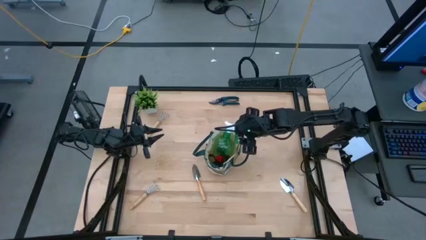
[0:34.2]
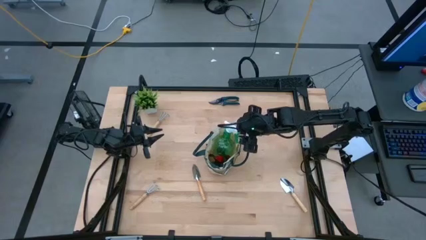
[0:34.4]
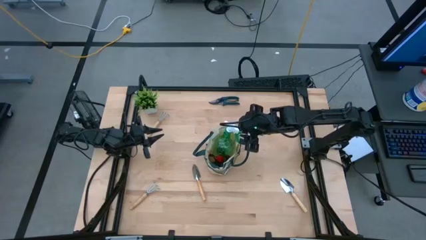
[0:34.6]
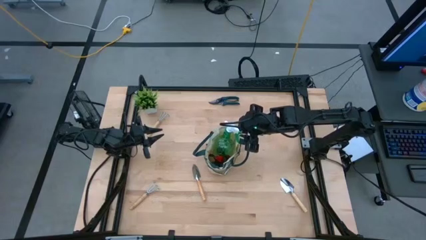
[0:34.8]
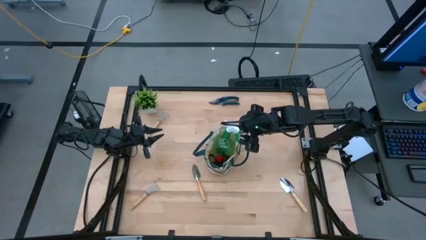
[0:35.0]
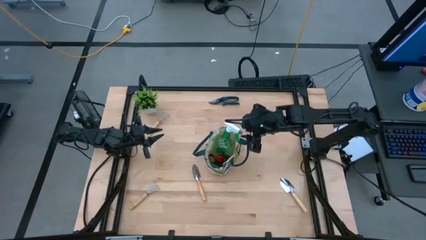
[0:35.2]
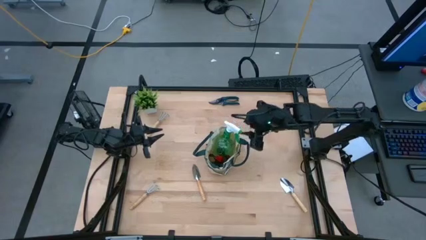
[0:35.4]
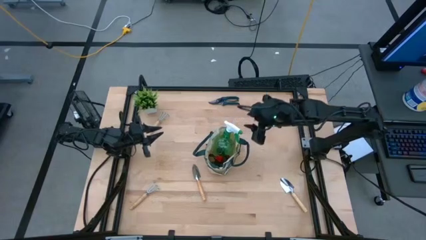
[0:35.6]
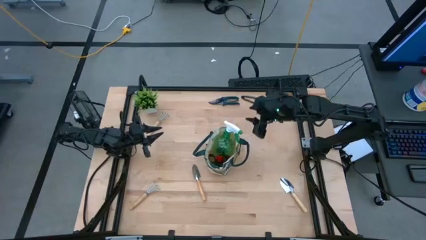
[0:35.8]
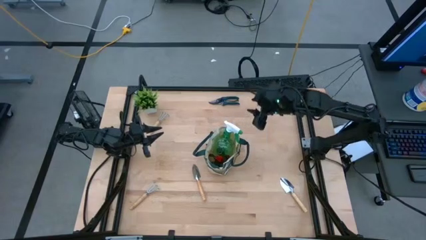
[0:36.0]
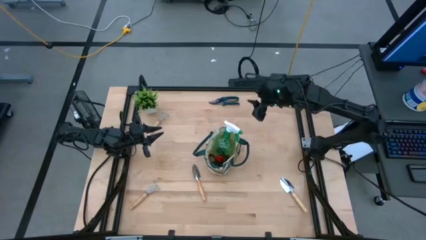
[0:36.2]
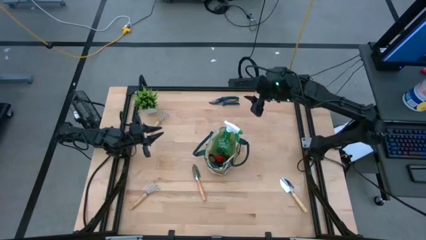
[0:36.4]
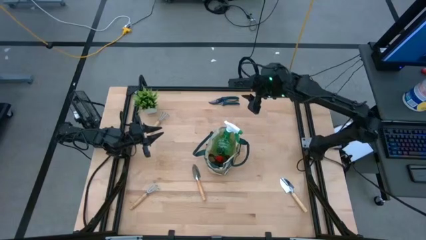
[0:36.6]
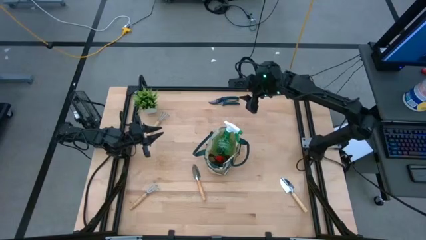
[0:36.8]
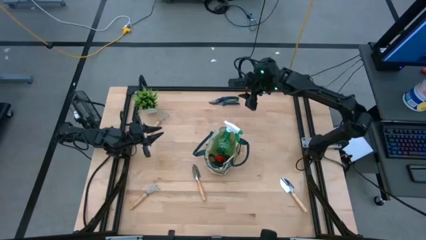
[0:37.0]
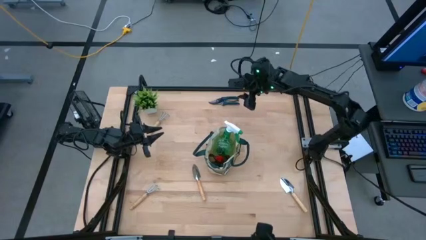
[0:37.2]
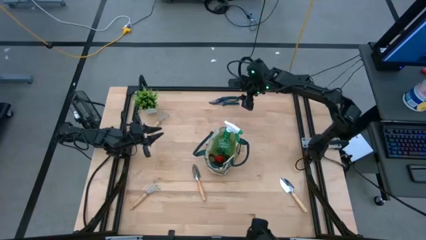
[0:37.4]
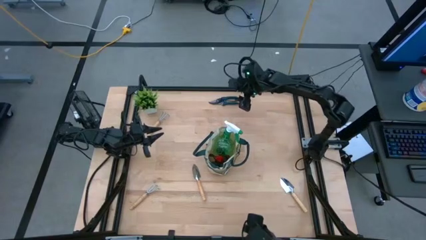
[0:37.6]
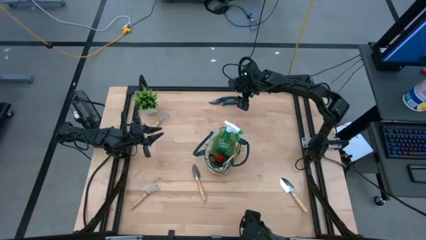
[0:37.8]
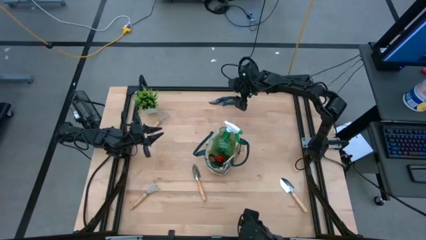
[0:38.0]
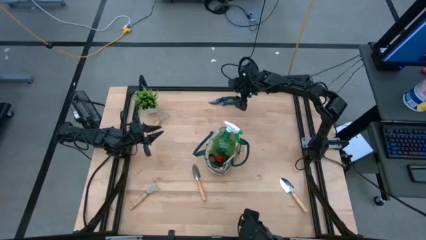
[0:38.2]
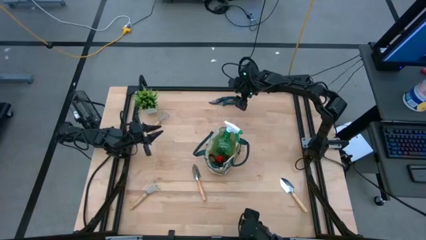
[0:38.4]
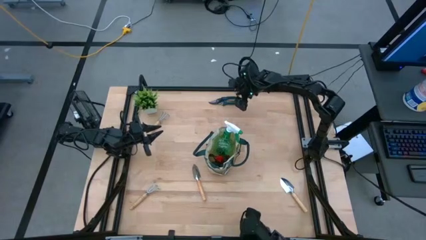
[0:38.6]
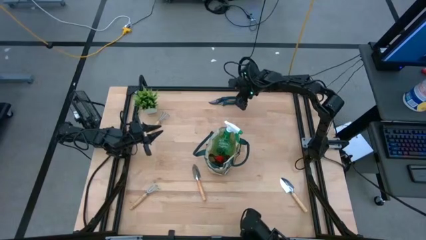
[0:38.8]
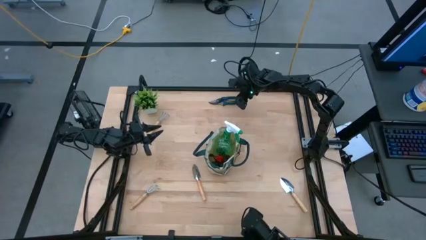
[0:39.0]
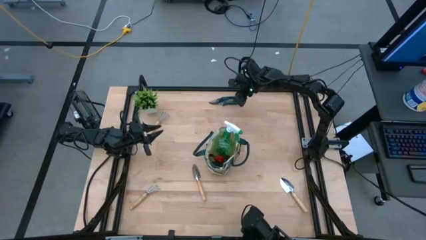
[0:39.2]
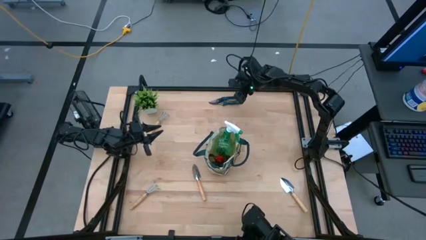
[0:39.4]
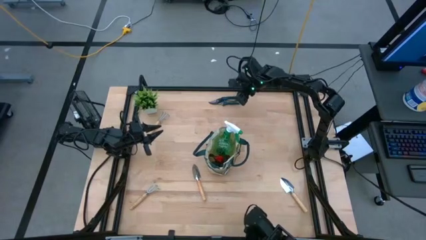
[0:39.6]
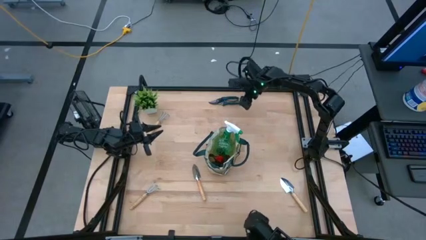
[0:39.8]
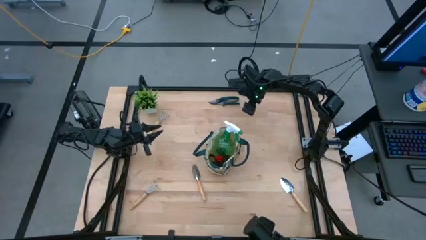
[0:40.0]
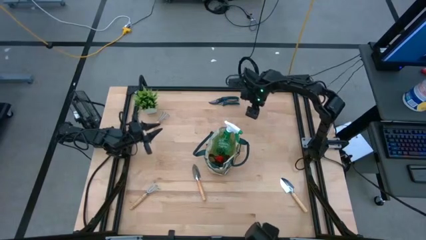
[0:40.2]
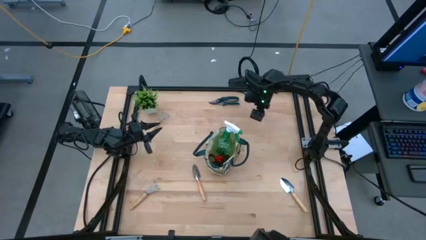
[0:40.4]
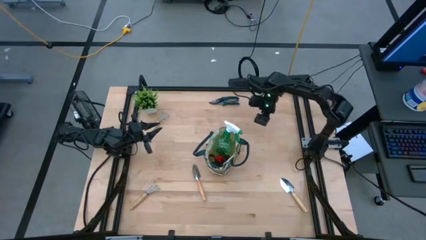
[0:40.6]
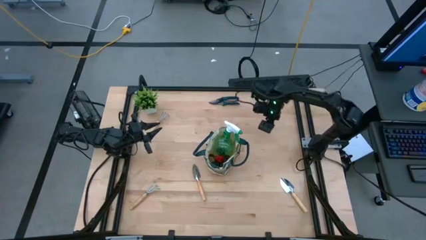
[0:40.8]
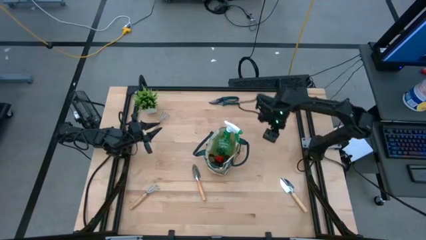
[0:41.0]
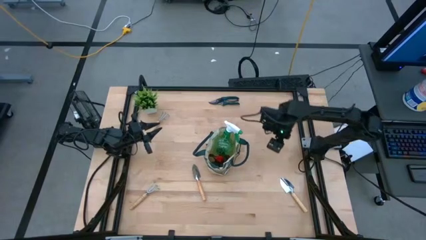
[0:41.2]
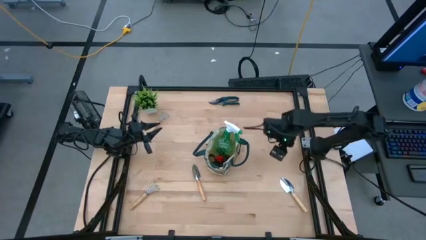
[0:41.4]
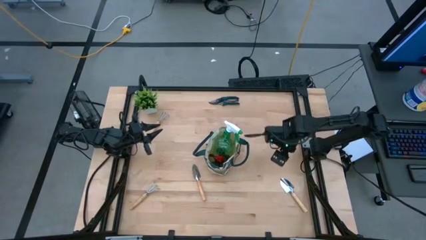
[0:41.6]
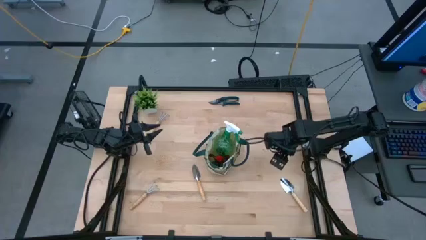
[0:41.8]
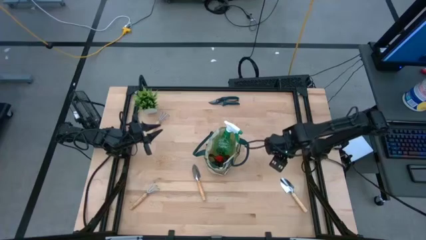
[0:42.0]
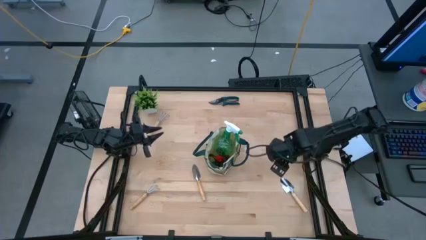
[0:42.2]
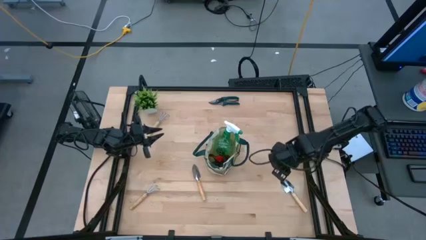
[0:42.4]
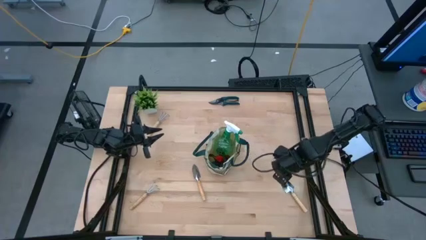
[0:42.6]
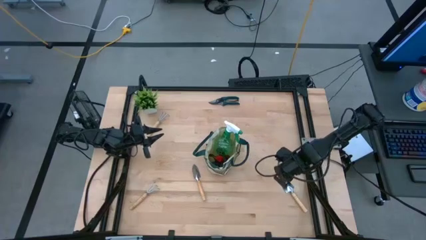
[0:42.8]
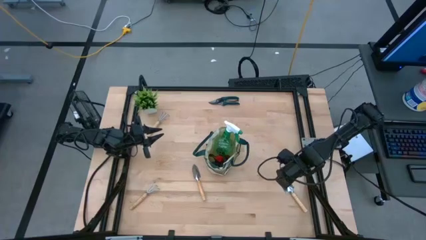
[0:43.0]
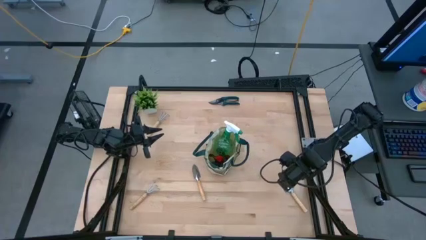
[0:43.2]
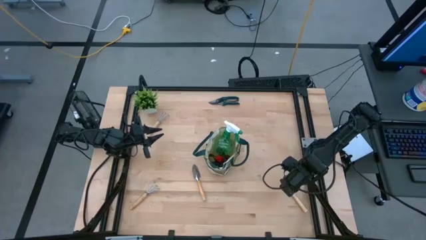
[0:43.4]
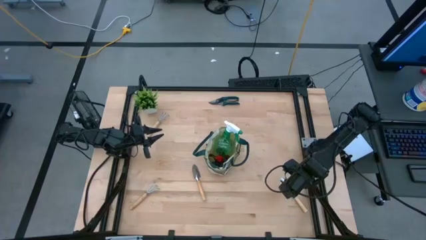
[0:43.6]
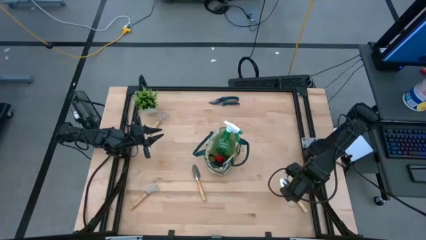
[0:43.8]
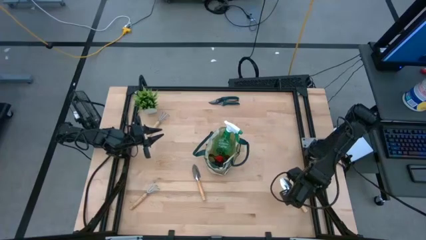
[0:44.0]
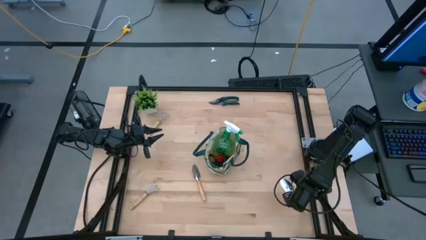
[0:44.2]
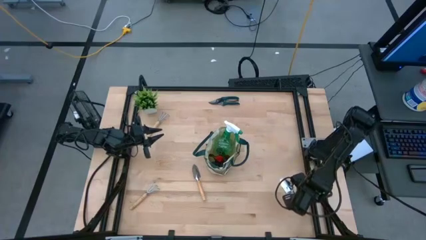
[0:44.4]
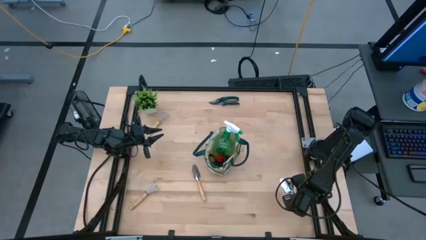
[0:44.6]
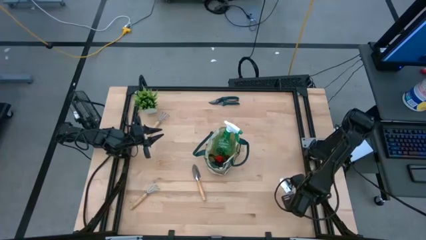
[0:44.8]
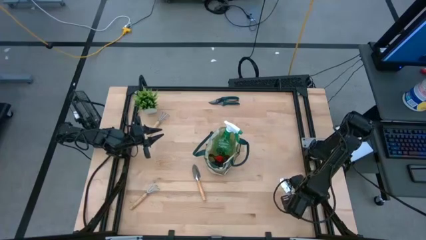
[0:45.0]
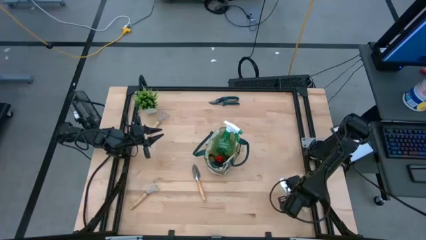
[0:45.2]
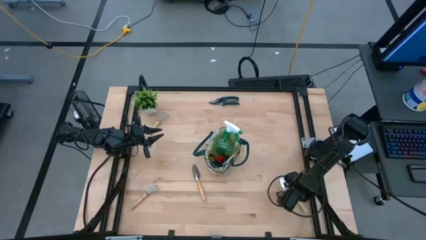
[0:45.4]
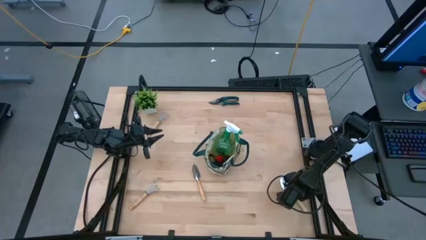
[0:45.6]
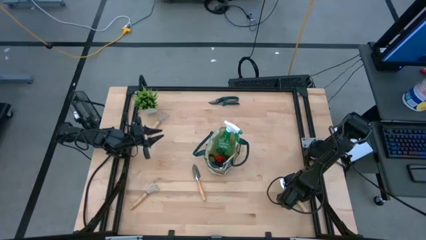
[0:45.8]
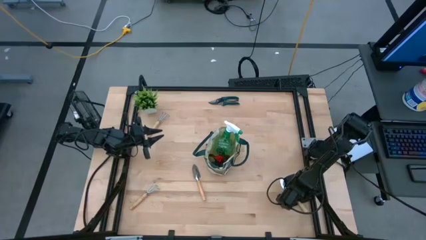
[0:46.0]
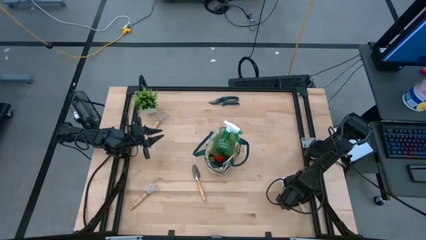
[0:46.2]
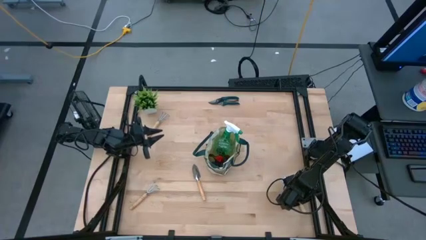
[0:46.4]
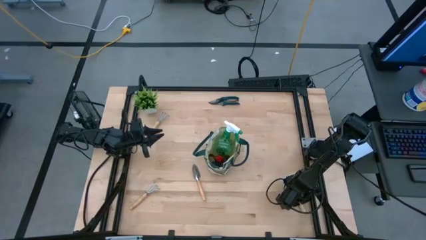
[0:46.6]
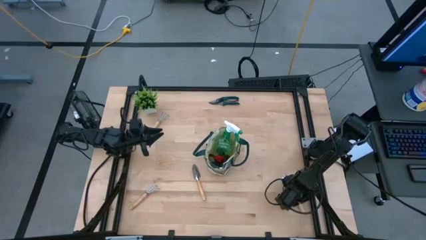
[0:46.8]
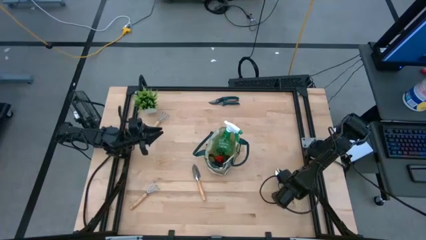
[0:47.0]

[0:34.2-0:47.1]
Task: Pick & Place Garden tools in Gardening bag
Put the right brown trowel into the gardening bag

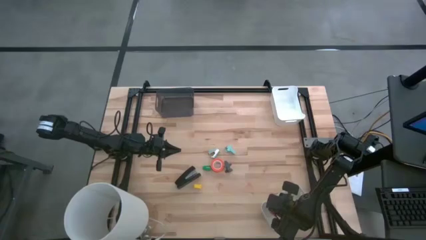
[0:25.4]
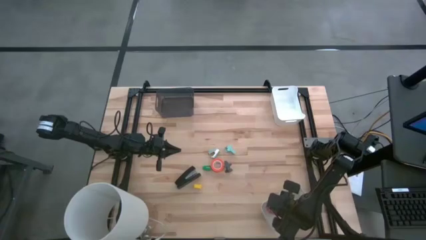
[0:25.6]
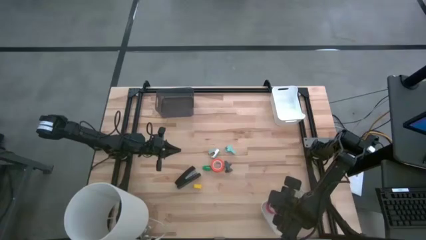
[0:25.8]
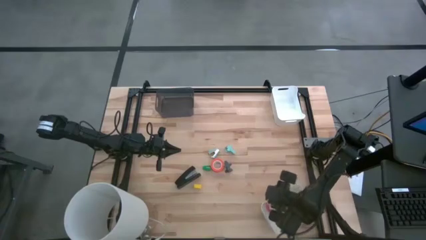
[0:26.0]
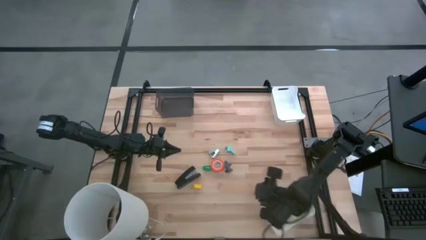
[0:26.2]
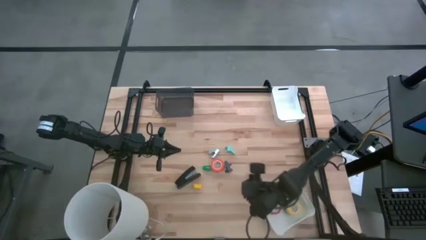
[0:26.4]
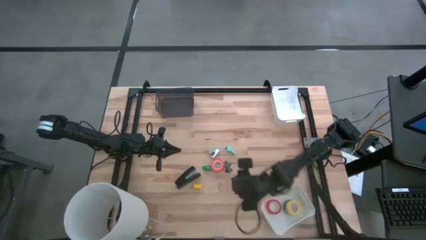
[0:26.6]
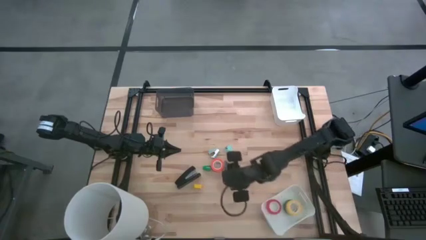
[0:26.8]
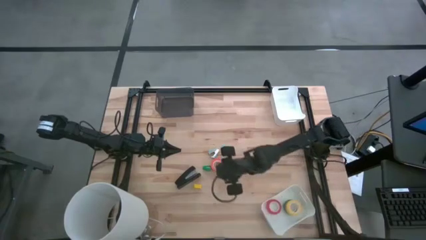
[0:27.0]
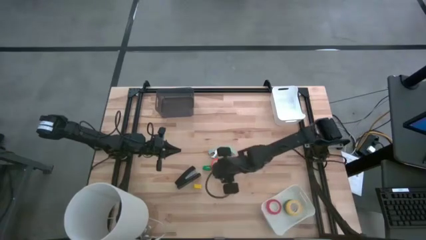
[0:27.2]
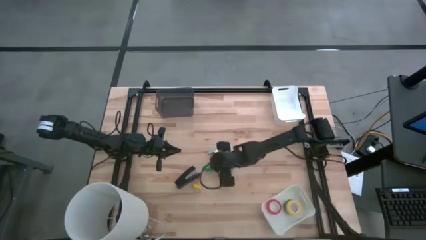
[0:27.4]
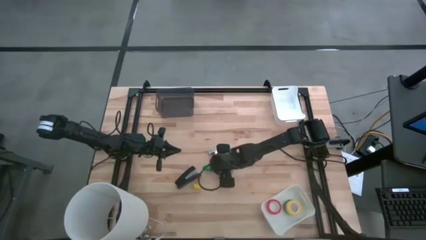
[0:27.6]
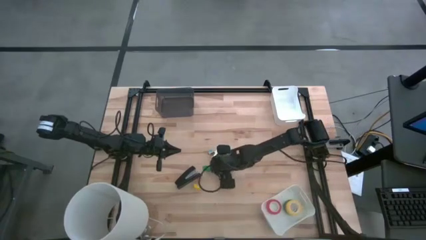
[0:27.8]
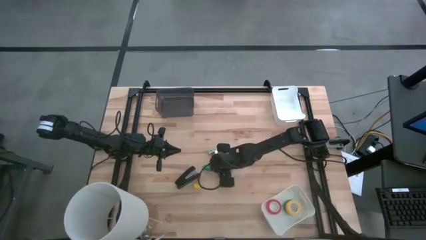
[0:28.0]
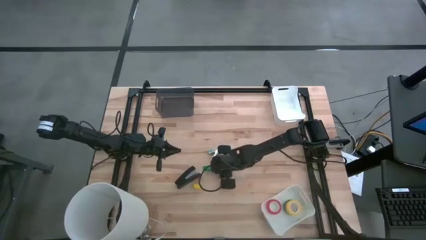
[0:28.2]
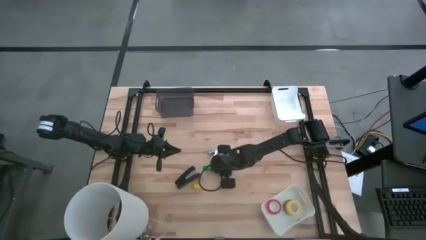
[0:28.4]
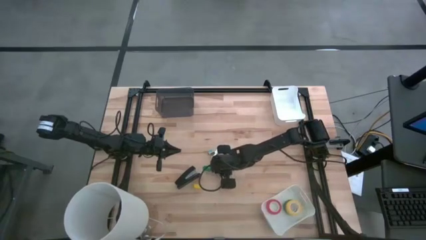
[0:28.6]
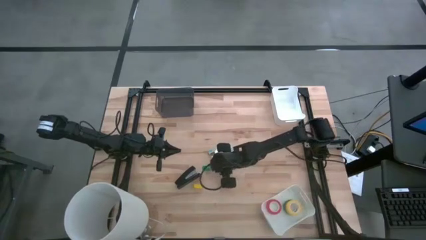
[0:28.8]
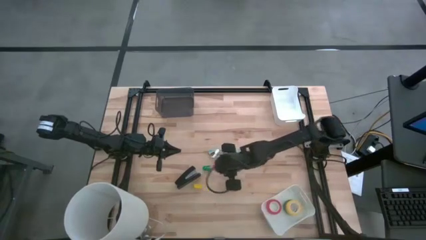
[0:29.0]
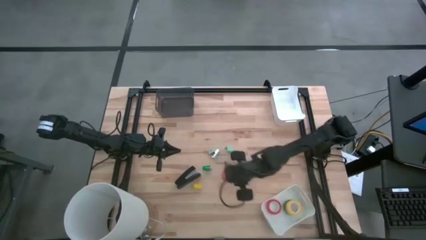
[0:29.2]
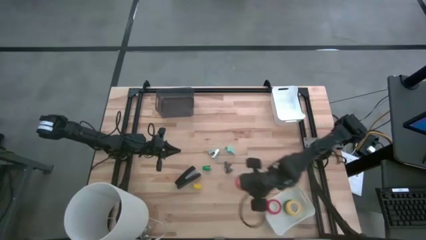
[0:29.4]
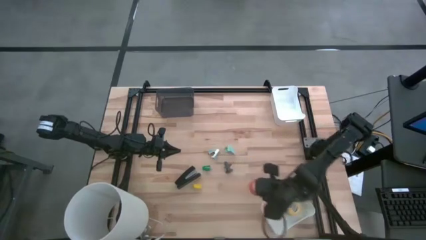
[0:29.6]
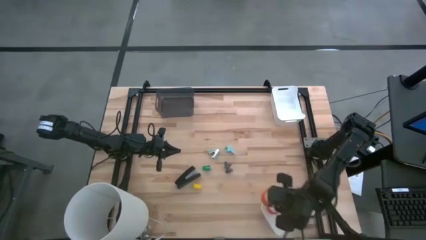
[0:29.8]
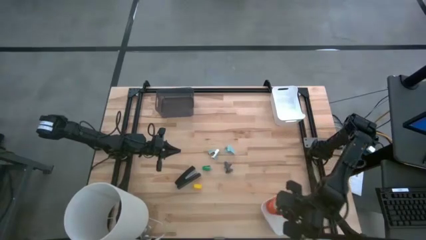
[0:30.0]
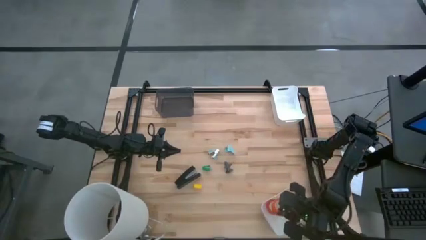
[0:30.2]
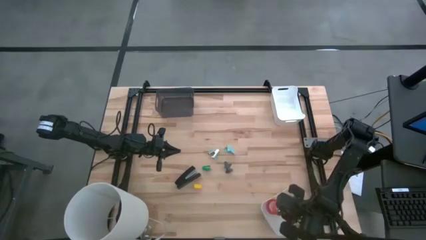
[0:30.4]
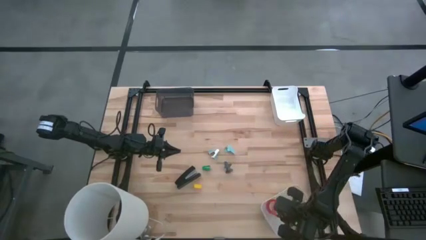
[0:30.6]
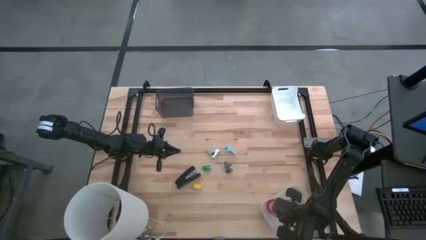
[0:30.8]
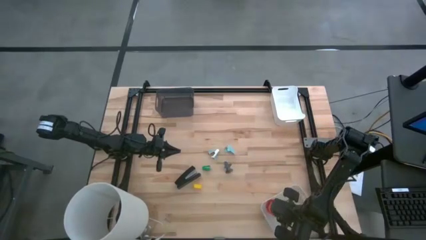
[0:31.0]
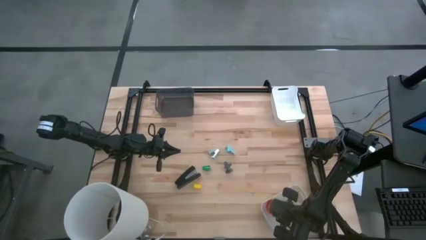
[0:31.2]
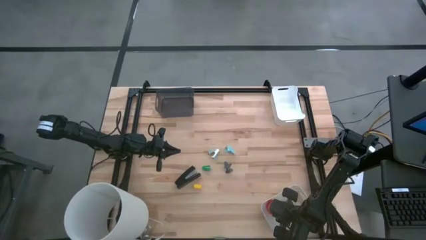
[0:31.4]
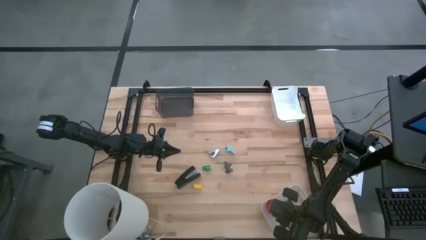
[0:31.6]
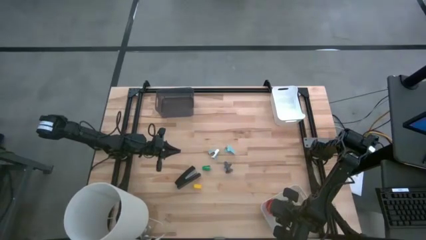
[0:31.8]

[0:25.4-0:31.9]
Task: Pick and place Stapler, Stapler remover, tape
Put the orange tape into the bottom white bin
